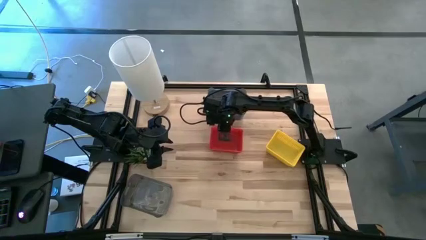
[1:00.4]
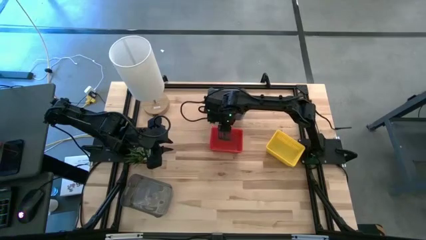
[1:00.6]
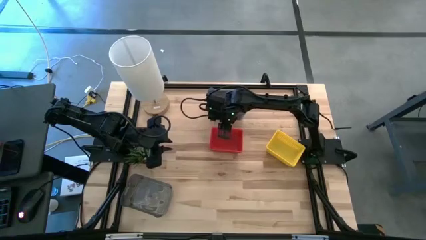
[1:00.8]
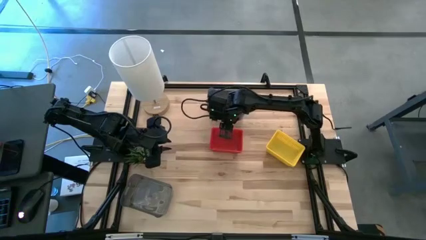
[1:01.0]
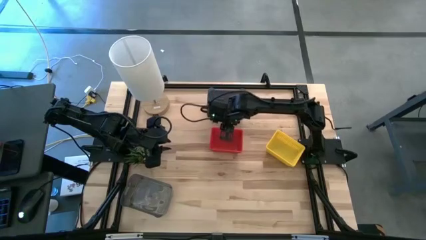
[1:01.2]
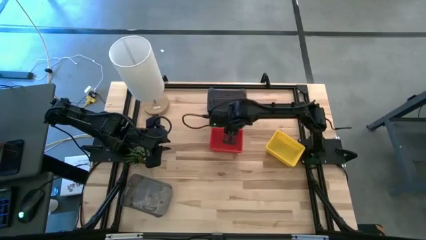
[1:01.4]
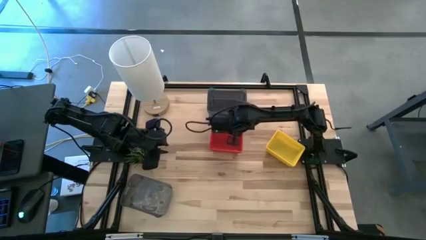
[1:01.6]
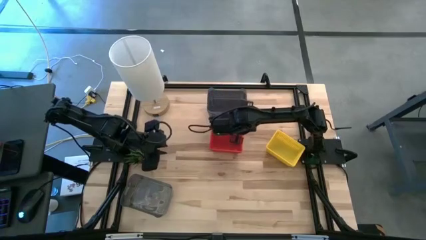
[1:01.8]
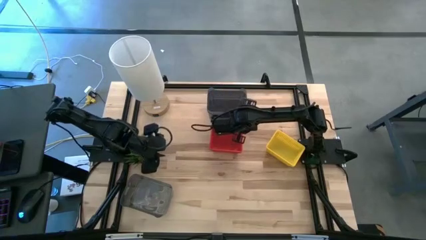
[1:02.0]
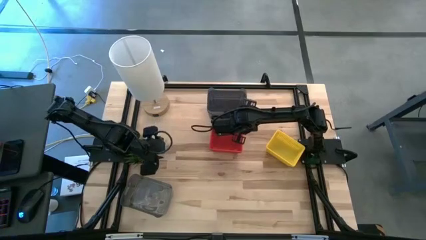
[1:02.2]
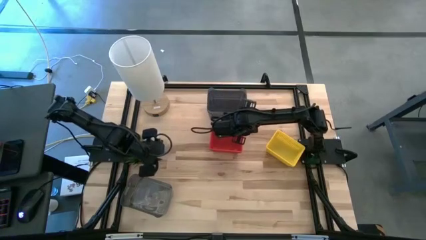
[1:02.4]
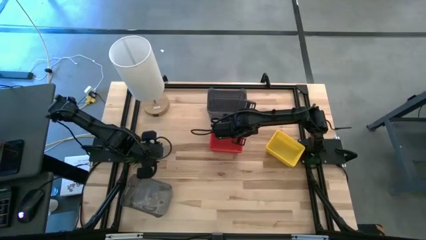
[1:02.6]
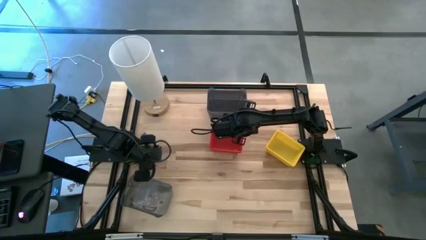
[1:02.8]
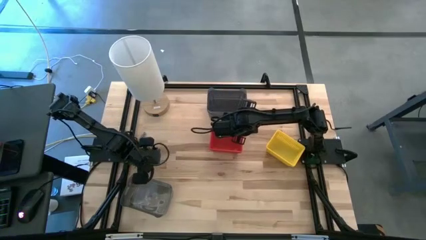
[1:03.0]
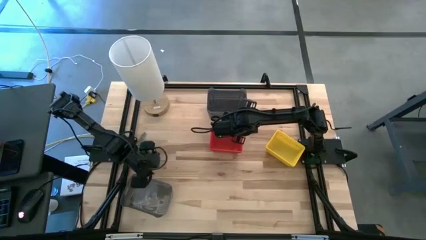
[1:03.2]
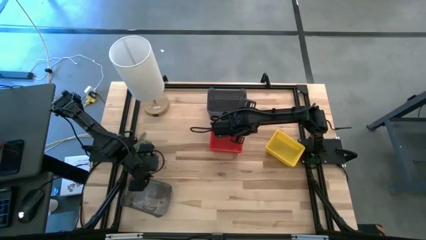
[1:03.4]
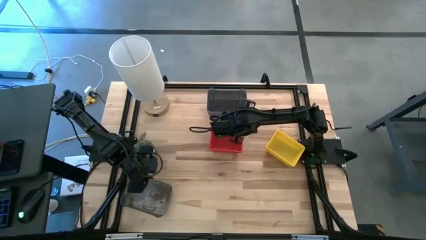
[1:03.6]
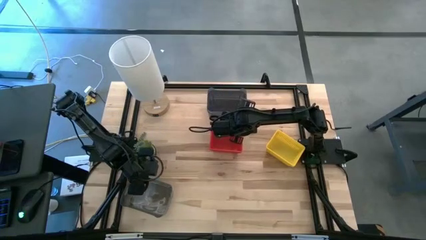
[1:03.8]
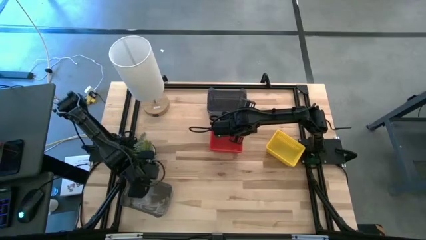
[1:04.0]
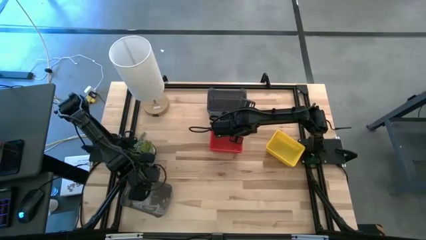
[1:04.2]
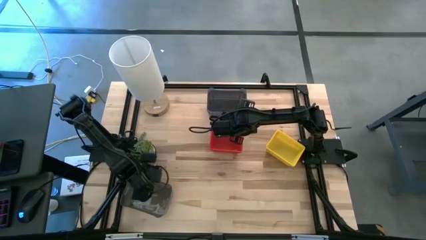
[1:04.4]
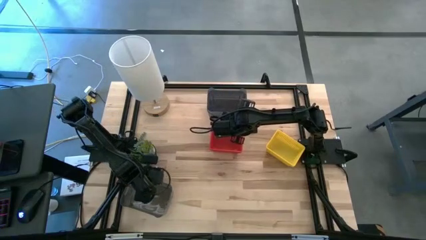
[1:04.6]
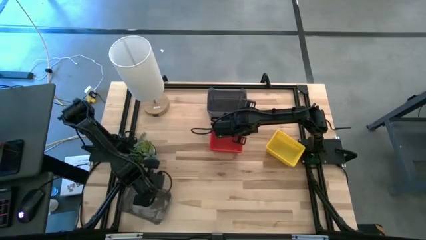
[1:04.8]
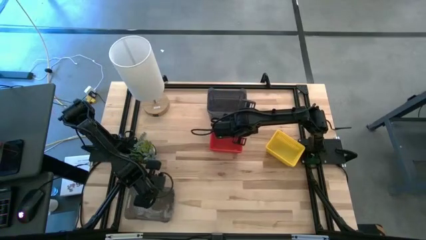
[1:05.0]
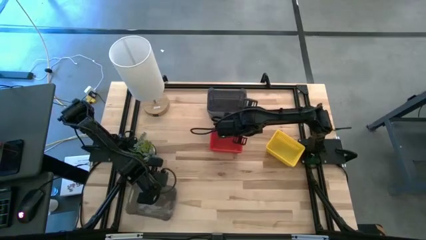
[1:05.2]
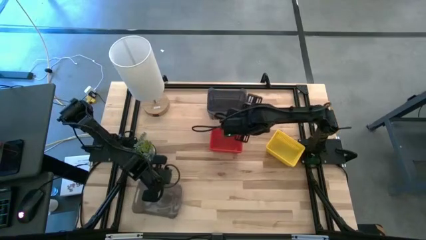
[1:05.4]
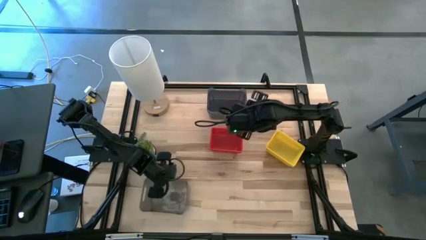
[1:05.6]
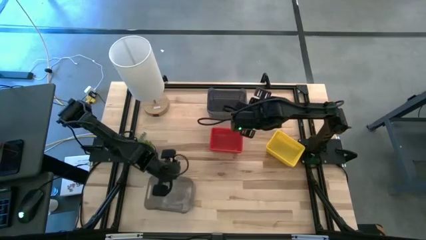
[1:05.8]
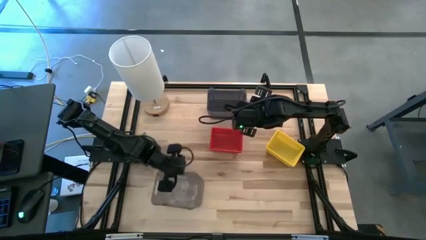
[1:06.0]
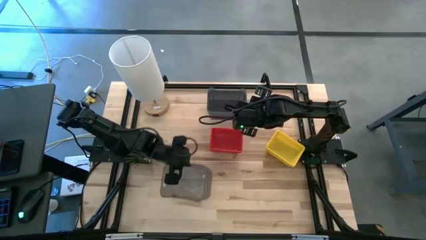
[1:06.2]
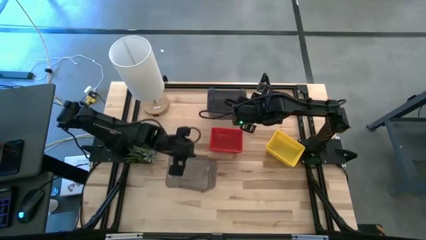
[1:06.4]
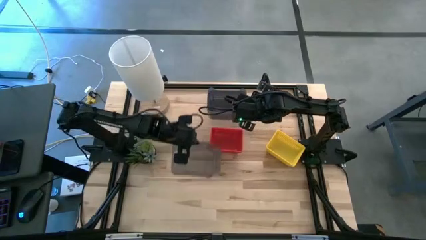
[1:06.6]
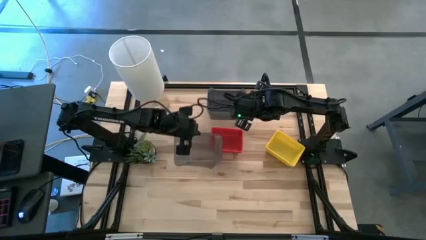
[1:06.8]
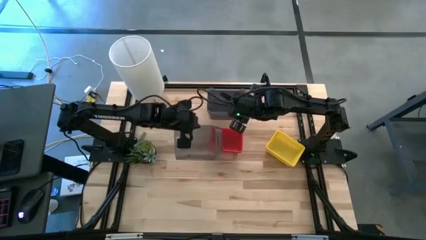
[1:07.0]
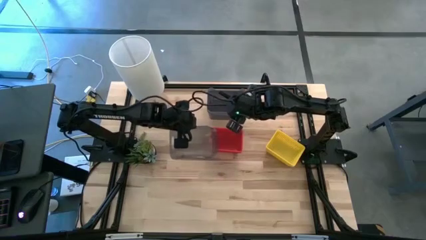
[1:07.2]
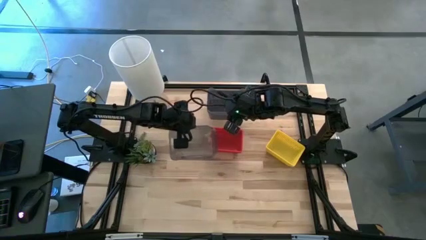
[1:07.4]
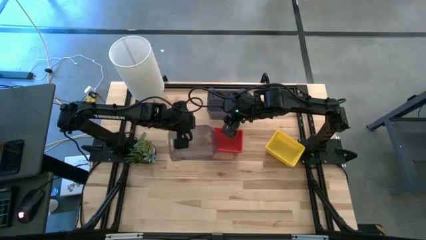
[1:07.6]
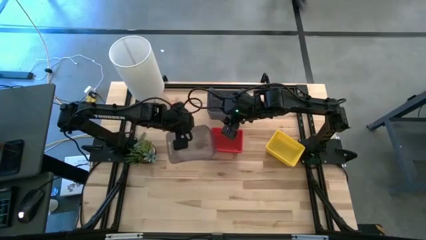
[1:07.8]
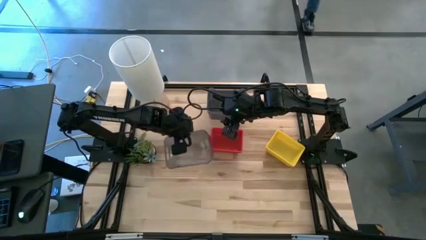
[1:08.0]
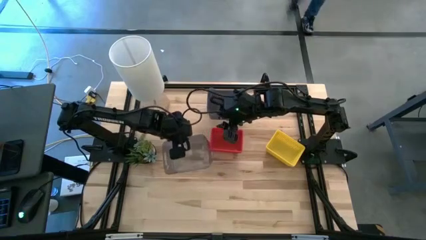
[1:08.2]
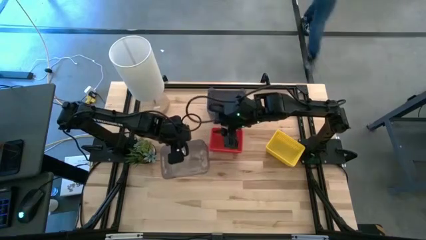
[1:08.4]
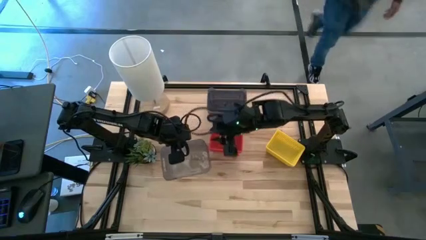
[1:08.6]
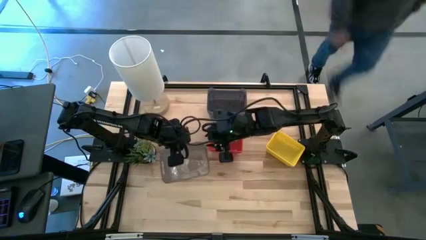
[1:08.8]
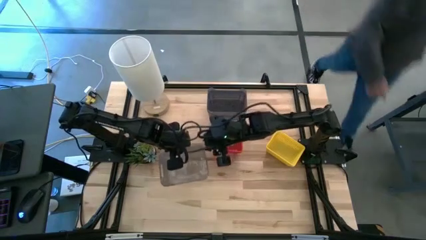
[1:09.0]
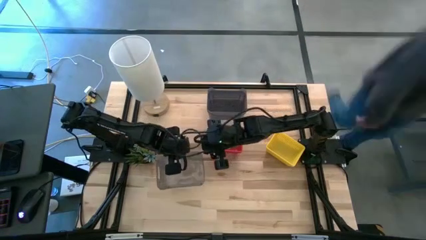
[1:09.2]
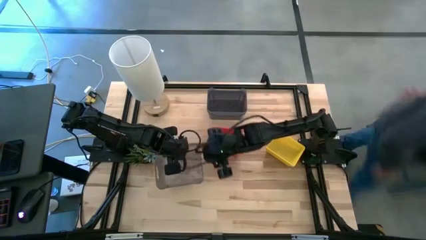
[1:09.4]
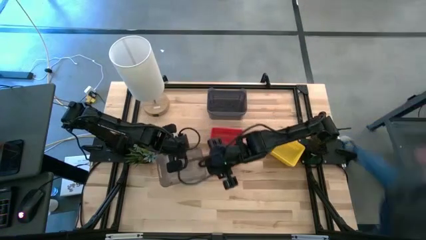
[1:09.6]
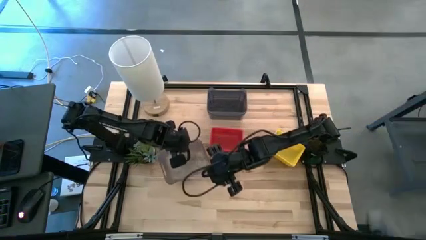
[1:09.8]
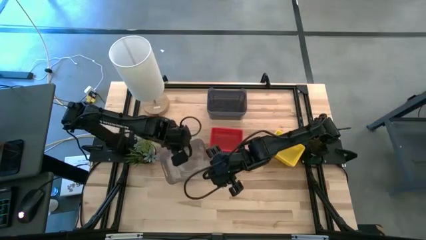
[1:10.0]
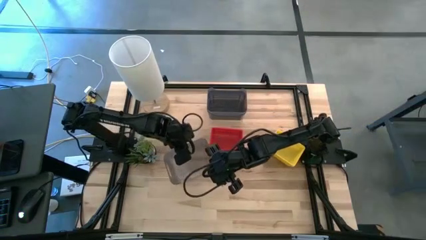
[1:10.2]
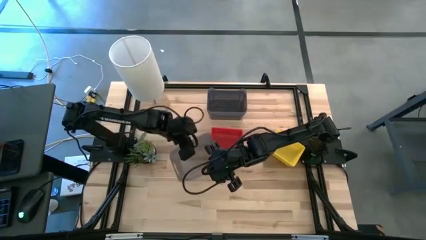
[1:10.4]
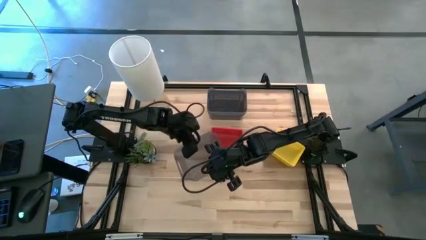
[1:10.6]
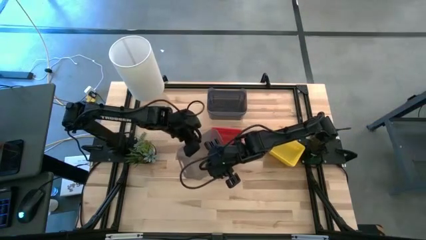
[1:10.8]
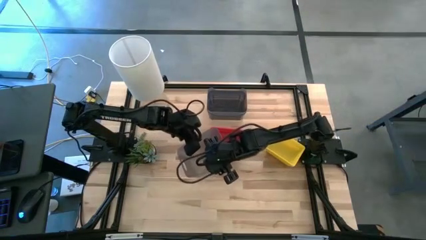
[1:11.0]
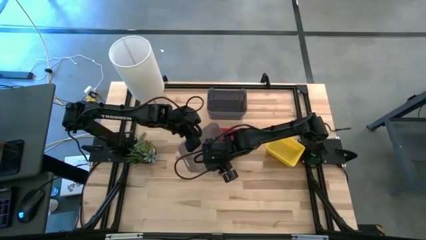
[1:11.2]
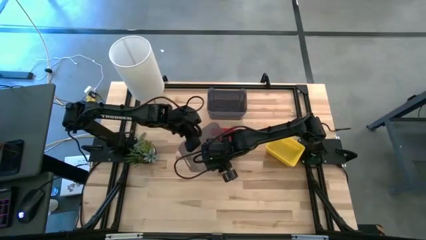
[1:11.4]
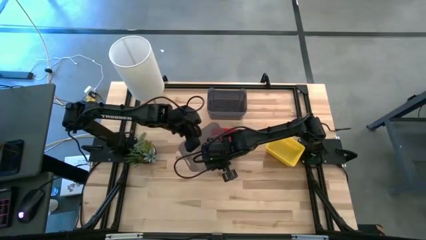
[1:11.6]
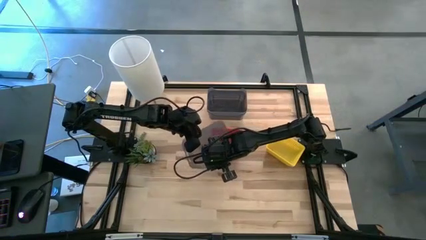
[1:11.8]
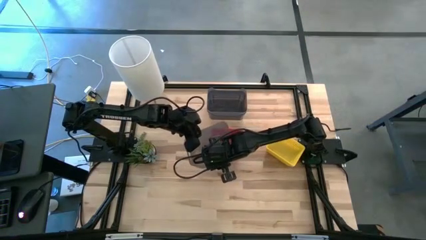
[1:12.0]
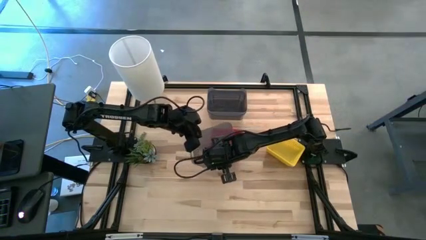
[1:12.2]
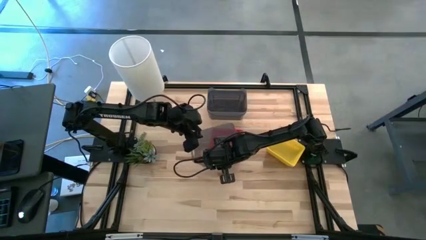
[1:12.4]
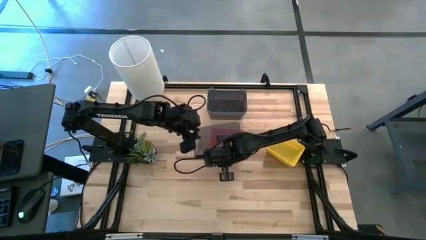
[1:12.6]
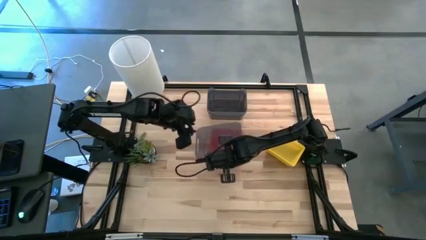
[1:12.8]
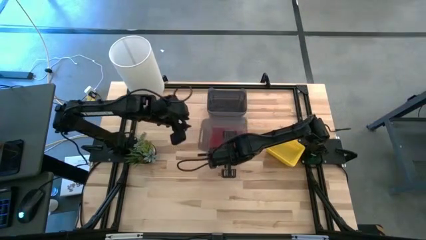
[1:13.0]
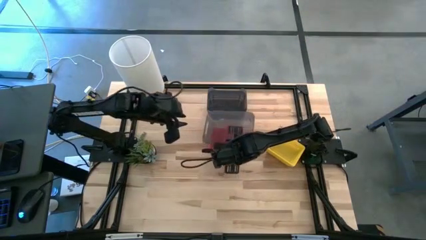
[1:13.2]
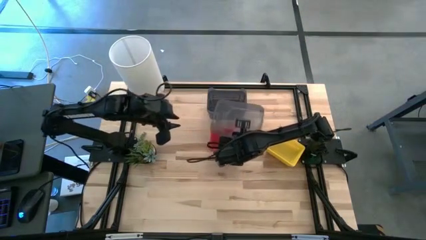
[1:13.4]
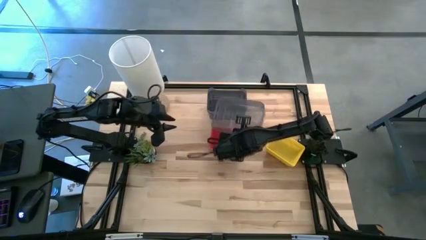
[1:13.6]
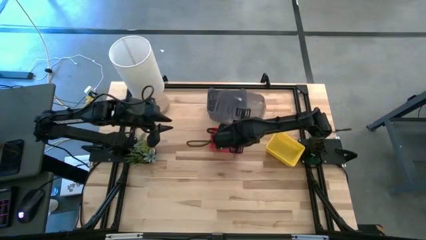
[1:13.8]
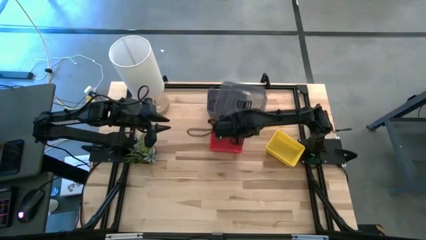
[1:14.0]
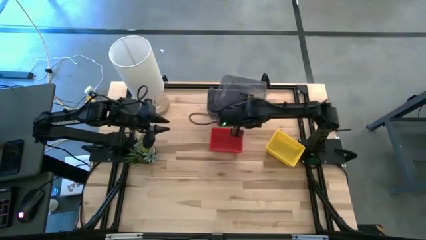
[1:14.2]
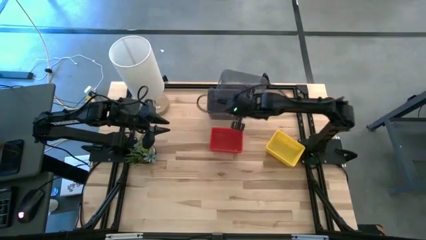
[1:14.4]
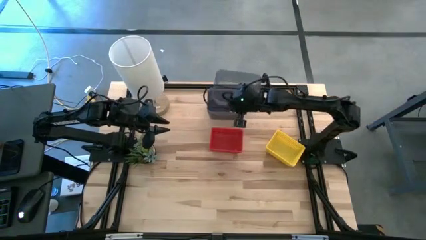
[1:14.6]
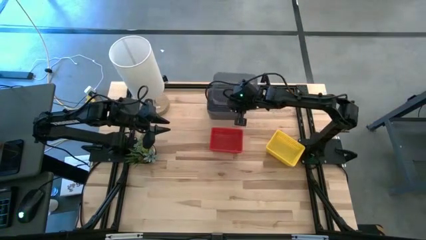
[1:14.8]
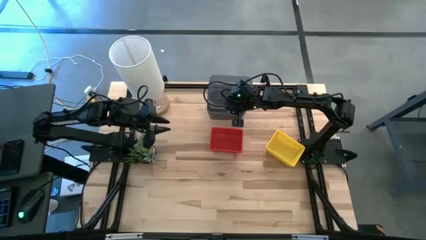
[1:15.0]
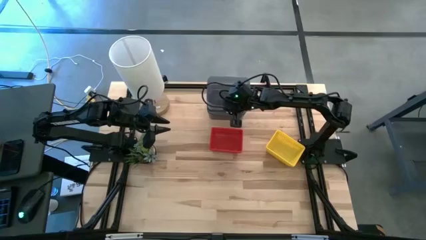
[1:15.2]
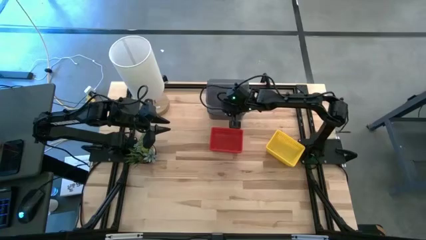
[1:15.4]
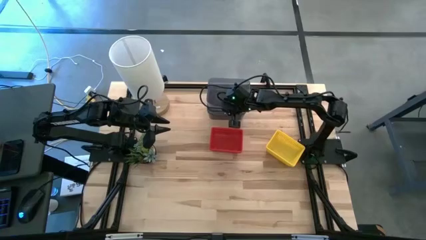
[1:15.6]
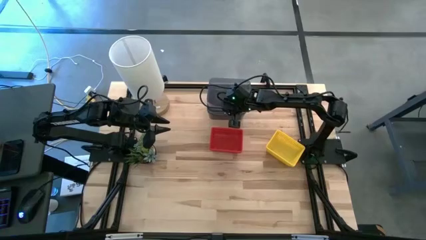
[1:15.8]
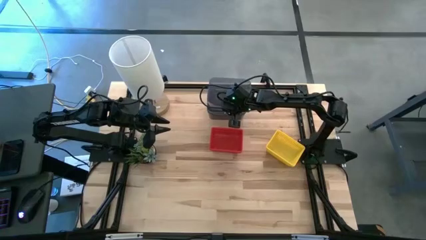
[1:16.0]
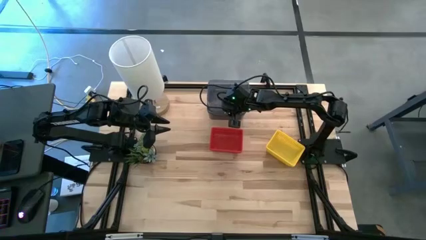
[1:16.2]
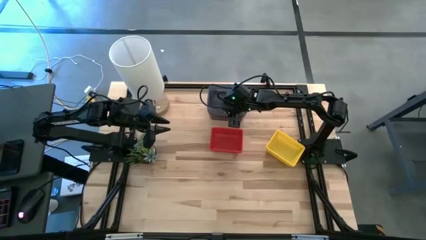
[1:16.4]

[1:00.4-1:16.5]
Stack the black bin on the stacked black bins
